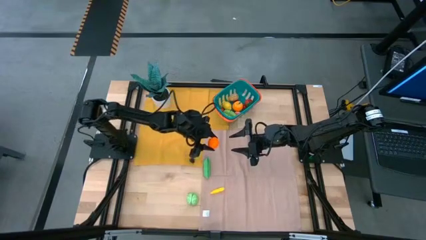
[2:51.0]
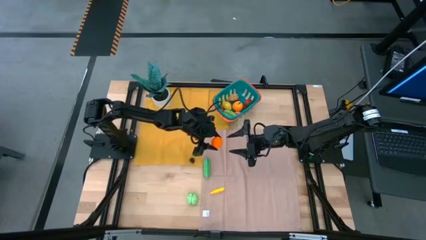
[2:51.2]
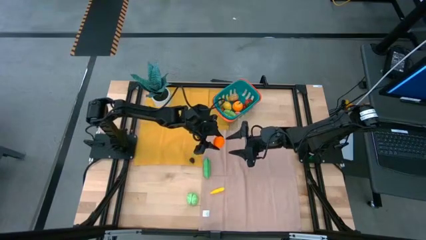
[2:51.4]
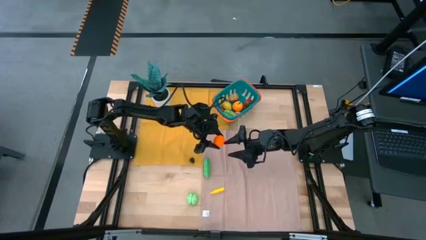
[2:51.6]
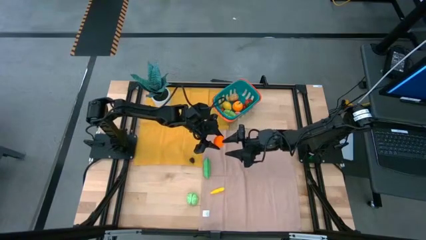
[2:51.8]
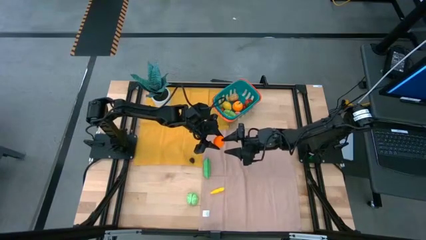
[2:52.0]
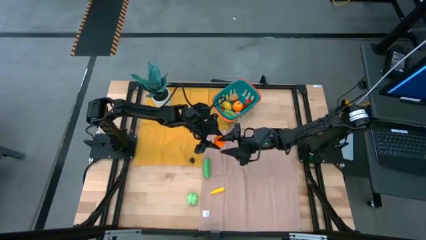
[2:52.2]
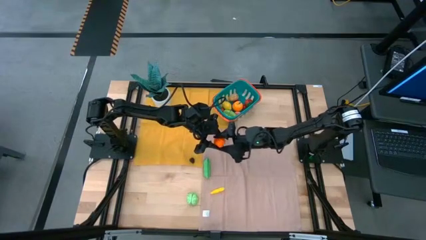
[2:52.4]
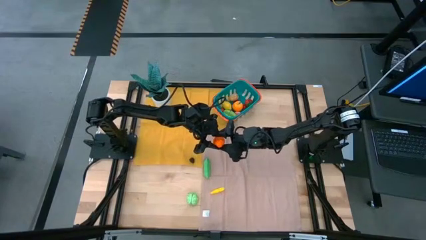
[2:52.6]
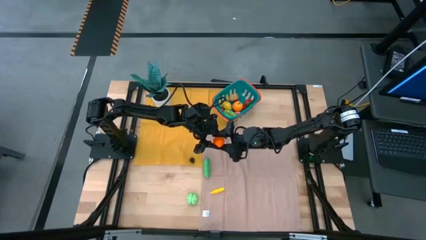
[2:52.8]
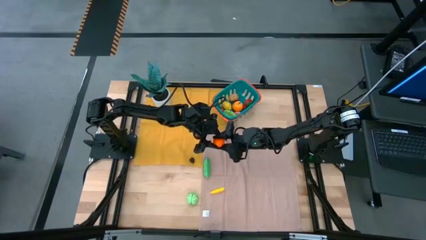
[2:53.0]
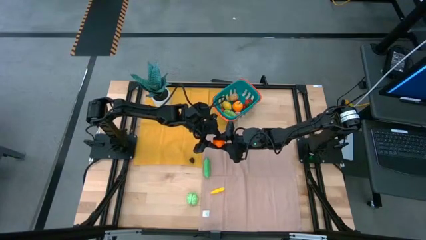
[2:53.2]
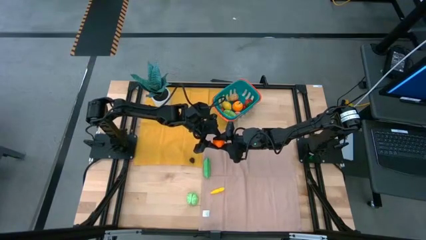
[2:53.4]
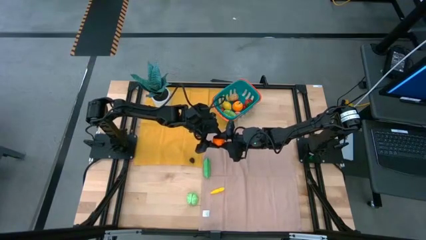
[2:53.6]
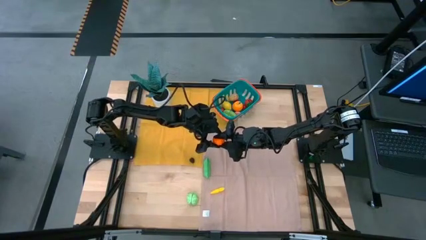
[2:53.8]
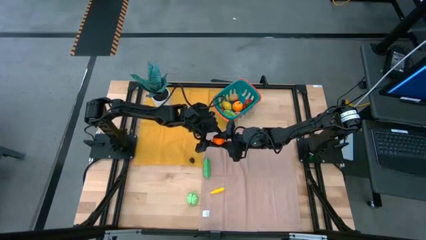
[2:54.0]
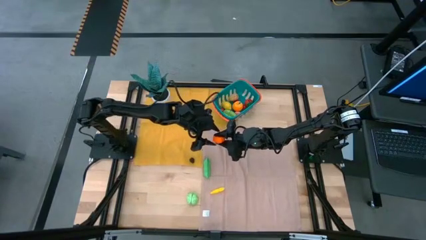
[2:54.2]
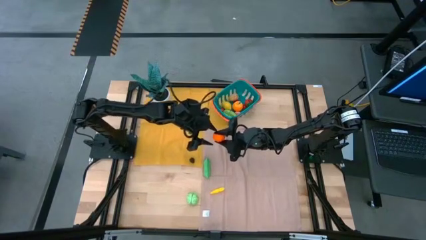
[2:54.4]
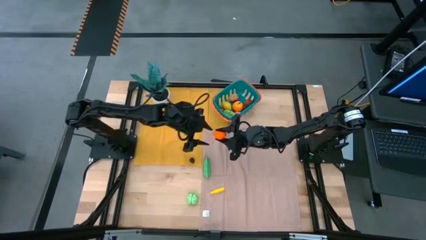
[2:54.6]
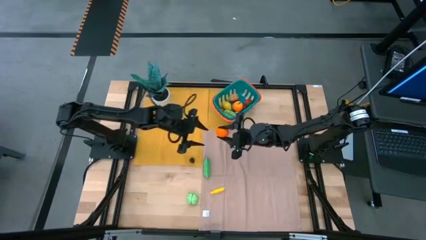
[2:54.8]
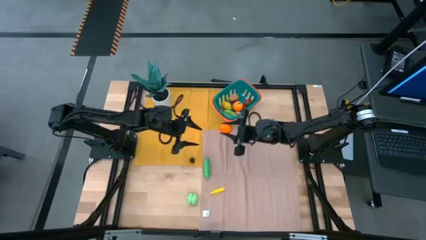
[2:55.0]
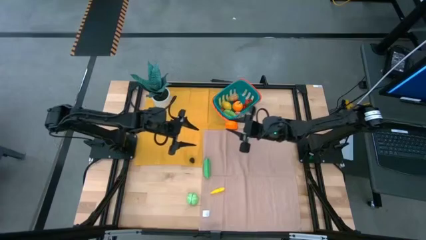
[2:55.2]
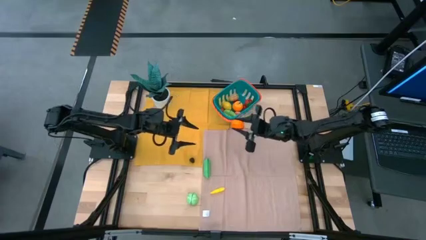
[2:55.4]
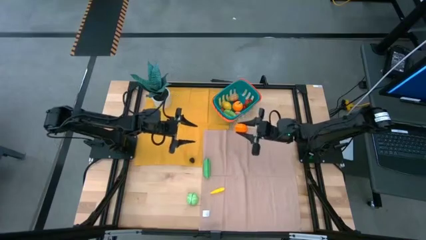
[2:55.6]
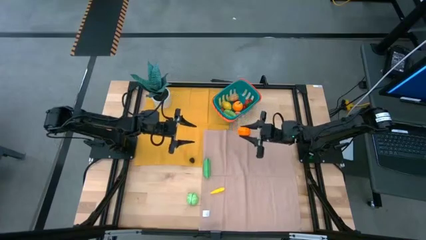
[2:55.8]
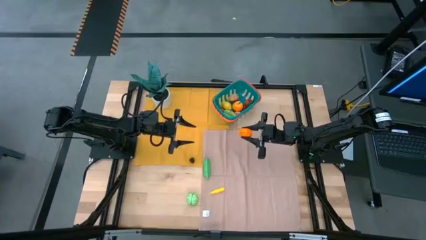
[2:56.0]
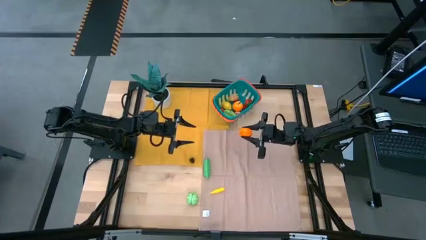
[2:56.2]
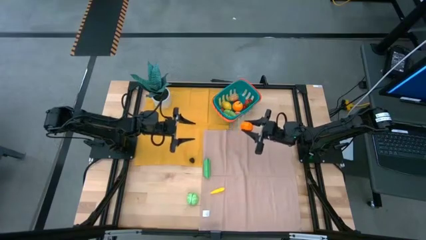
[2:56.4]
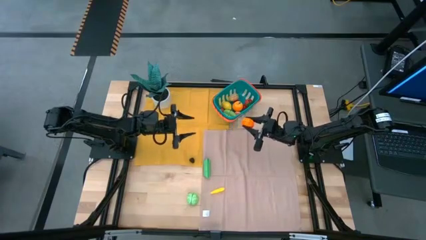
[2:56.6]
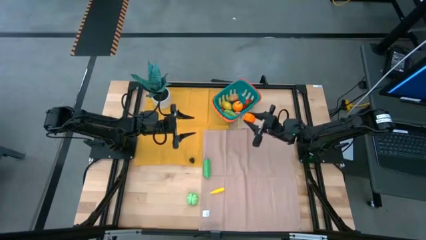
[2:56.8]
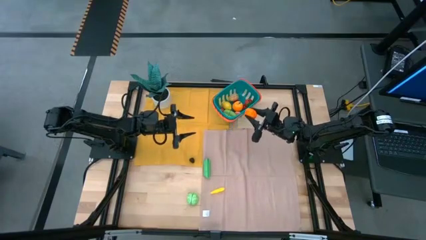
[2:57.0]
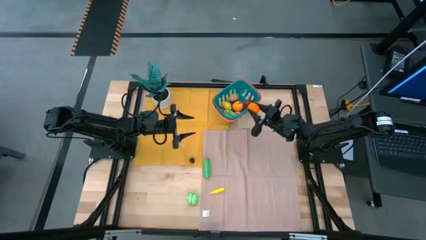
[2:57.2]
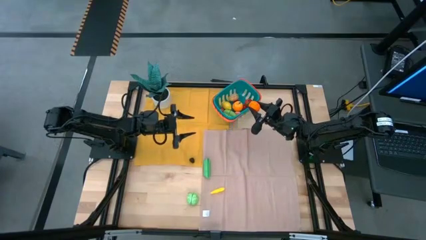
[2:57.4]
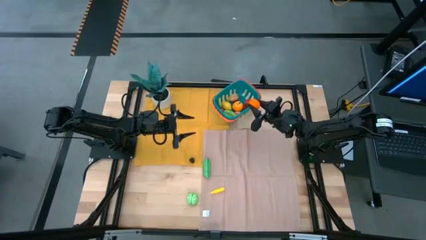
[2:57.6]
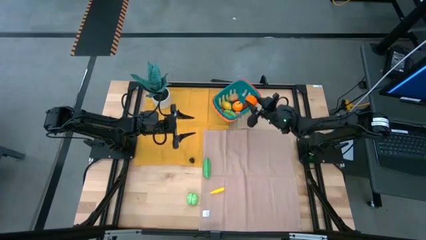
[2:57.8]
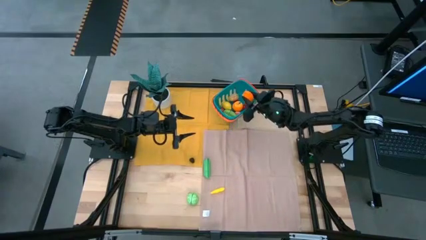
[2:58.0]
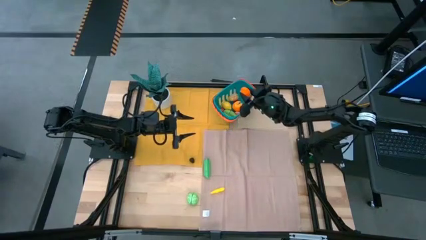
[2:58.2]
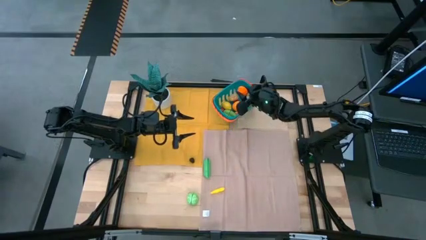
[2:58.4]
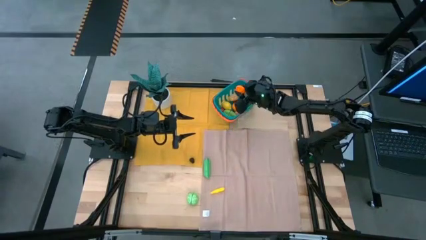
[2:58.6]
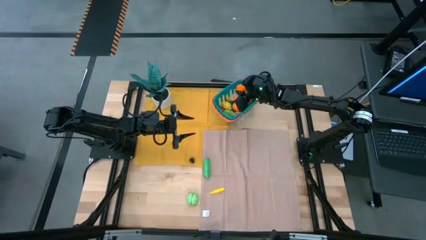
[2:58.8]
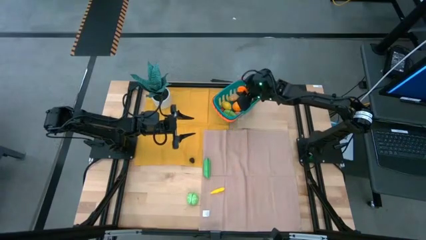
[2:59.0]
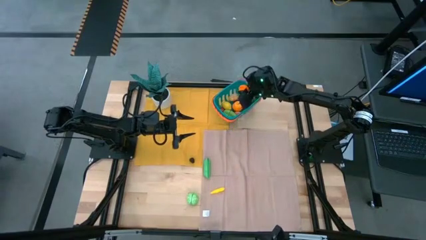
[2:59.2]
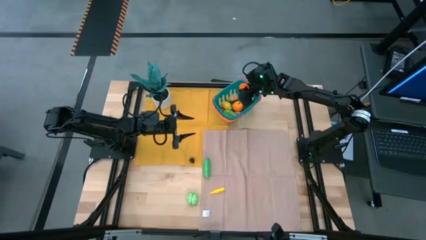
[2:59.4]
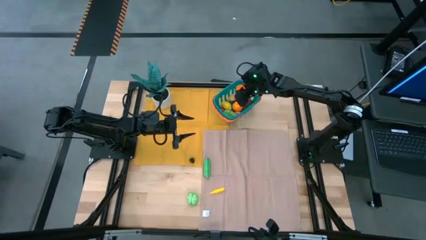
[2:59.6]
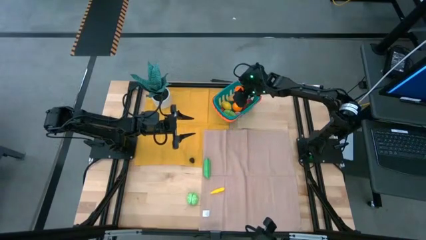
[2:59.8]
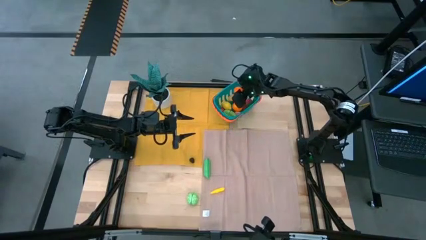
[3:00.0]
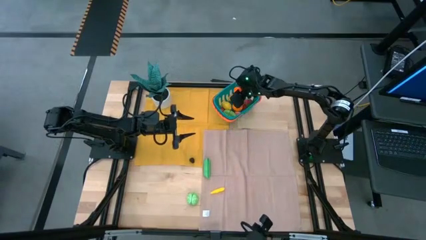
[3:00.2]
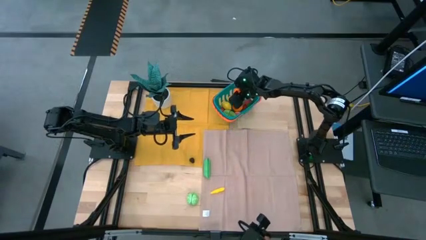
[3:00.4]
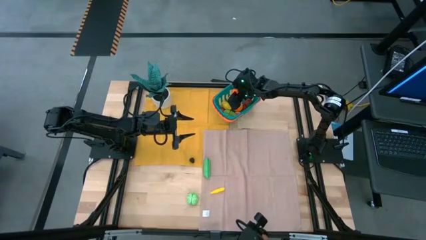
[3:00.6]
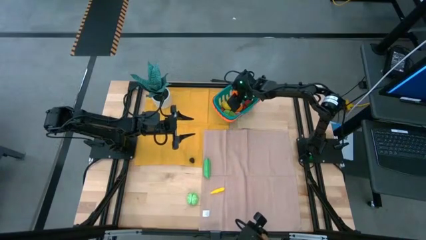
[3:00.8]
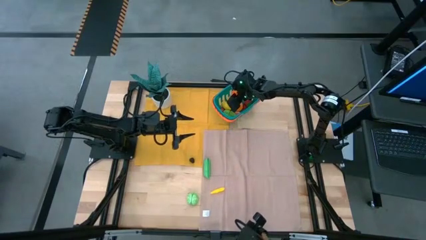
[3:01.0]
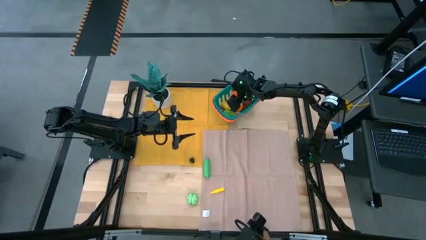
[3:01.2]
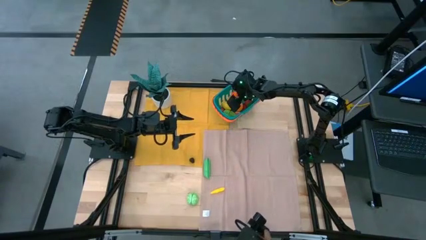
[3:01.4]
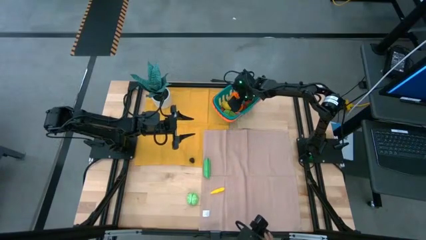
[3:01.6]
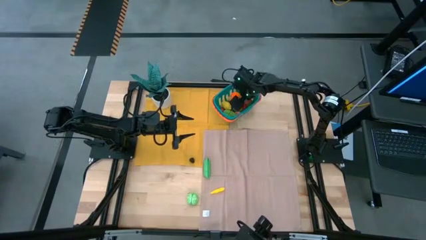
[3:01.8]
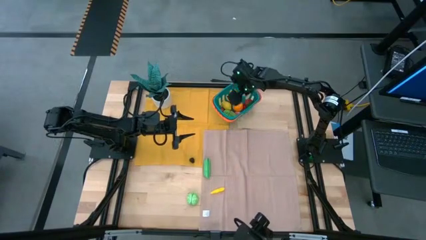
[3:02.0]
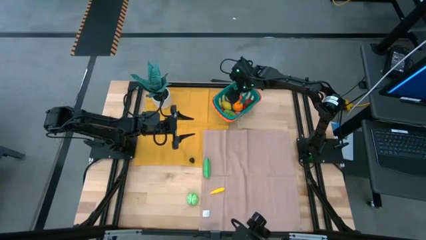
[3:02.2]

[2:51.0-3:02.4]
Task: Pick and placing Produce into tupperware
Put the tangerine into the basket

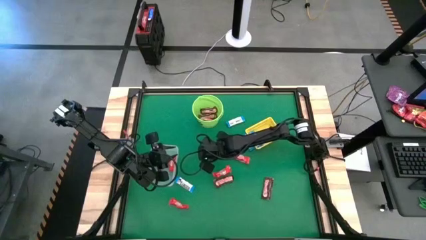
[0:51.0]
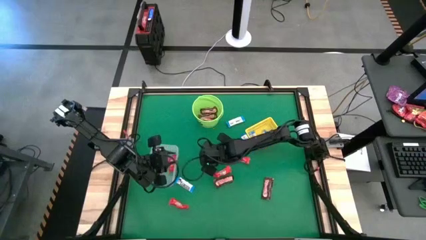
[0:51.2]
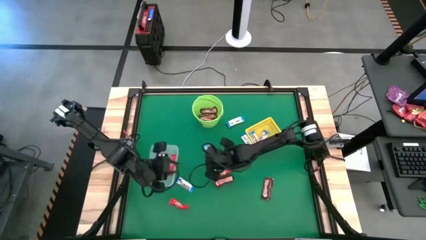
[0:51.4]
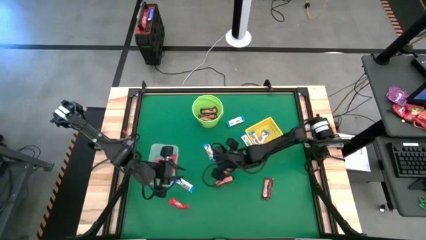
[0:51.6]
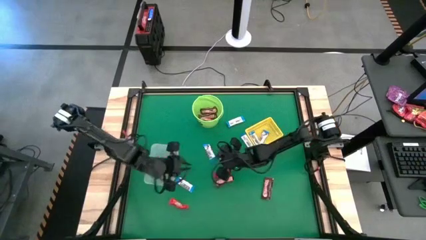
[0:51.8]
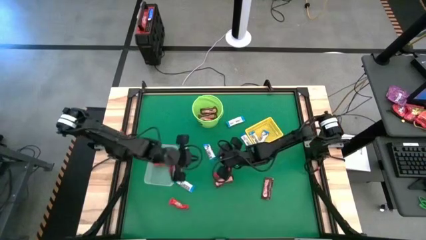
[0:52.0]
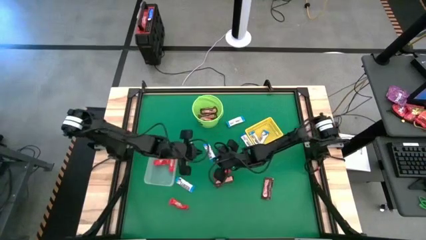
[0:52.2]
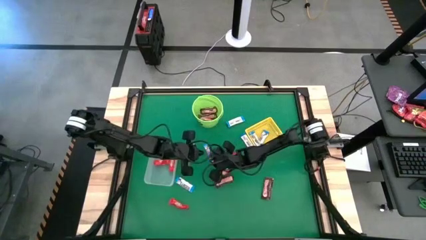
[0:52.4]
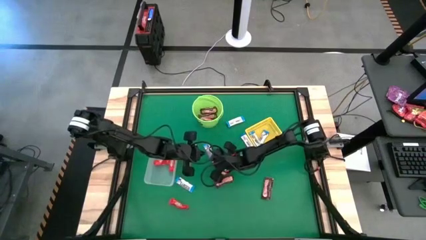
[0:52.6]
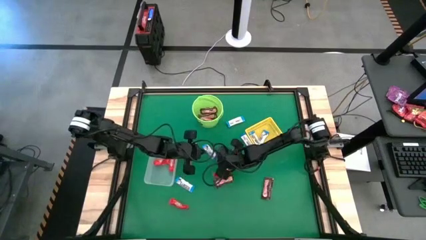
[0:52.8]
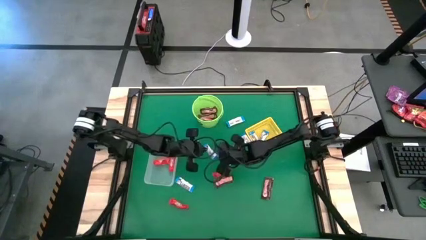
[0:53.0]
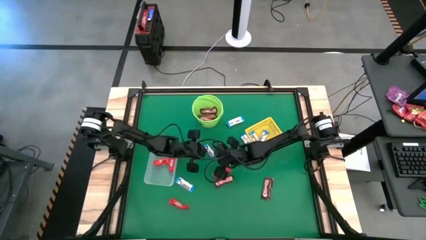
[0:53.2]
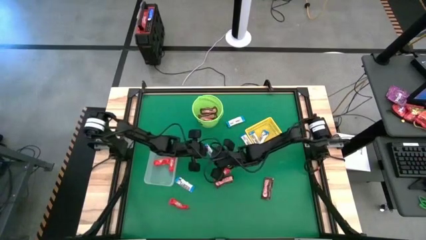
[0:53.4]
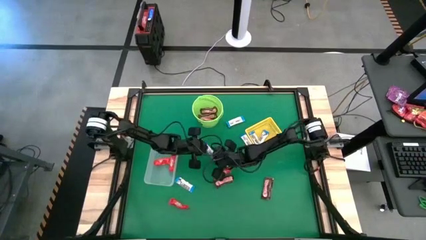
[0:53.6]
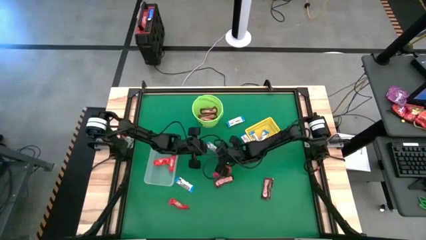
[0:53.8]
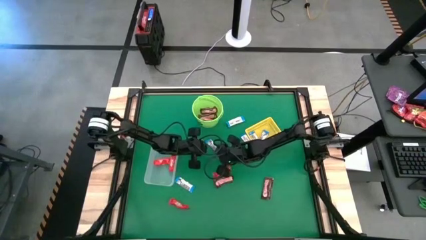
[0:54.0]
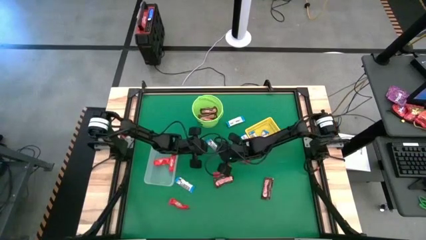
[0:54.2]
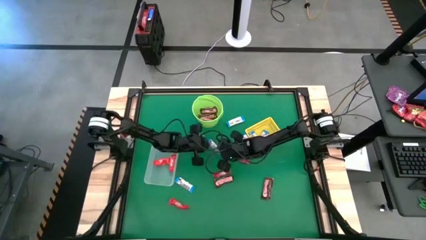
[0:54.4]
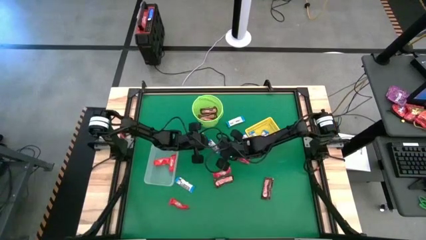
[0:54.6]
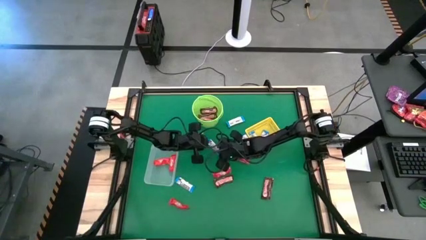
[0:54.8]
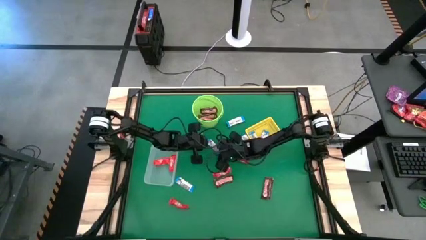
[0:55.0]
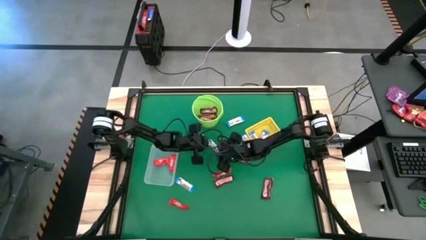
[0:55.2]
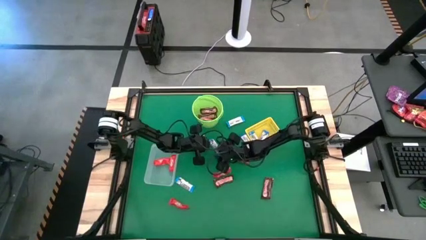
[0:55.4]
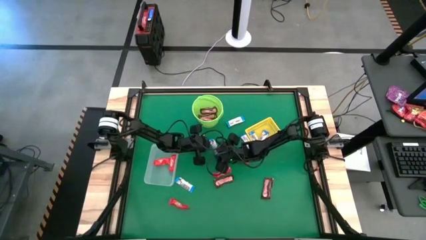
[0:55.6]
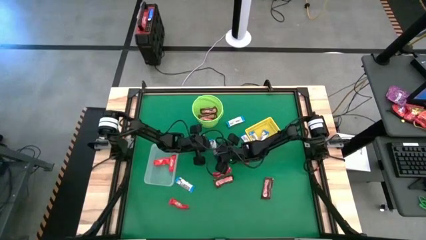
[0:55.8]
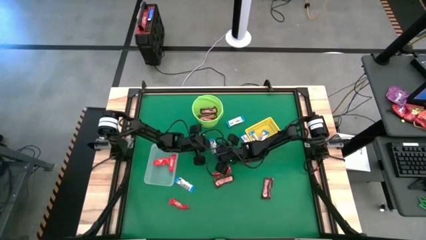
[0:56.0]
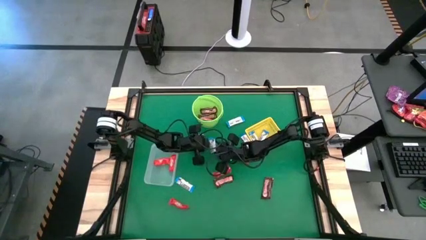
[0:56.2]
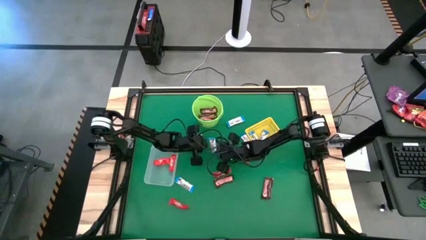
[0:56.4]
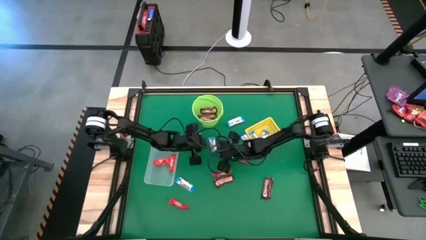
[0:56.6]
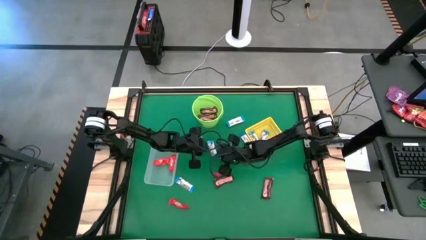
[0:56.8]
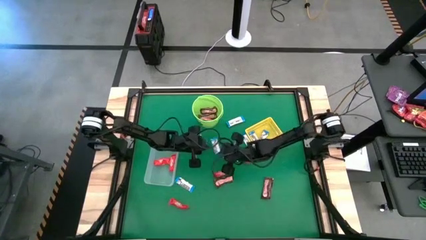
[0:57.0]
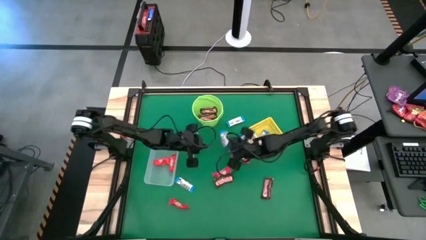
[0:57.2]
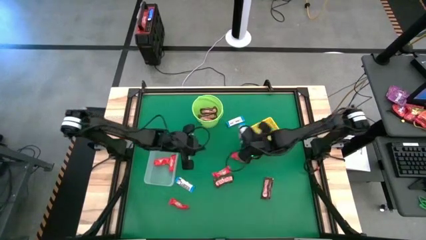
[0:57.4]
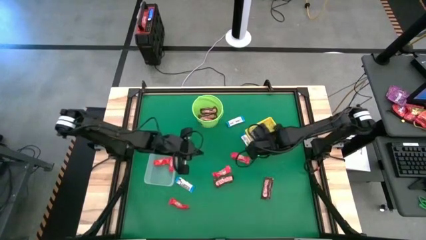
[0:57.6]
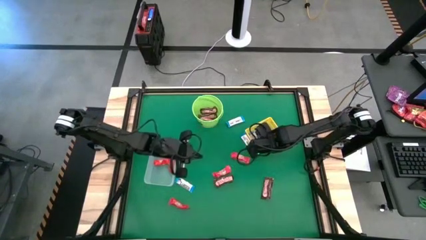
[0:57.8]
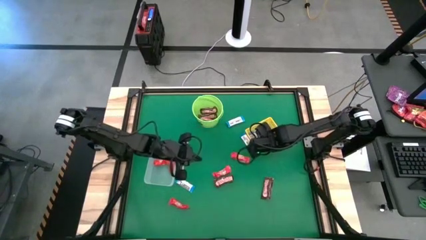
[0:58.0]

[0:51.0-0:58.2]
Task: Sort candy by brand, put in halloween buckets
Put the white chocolate bar into the yellow bin
